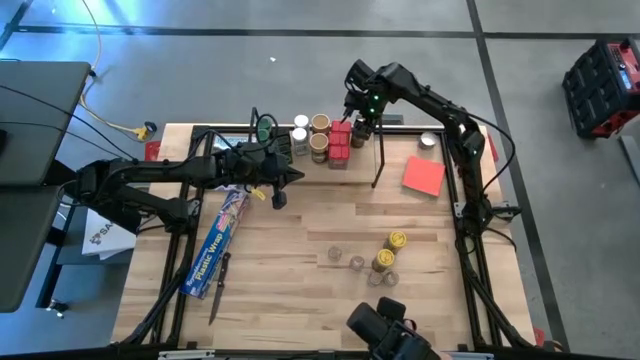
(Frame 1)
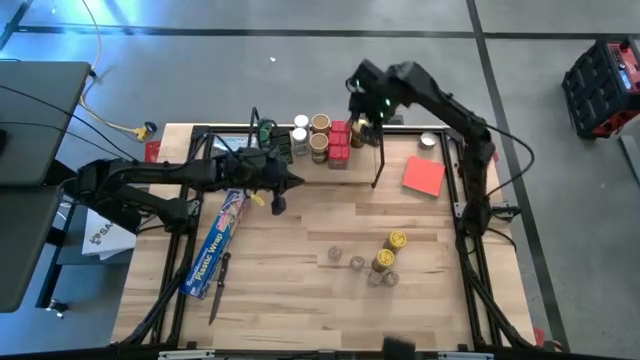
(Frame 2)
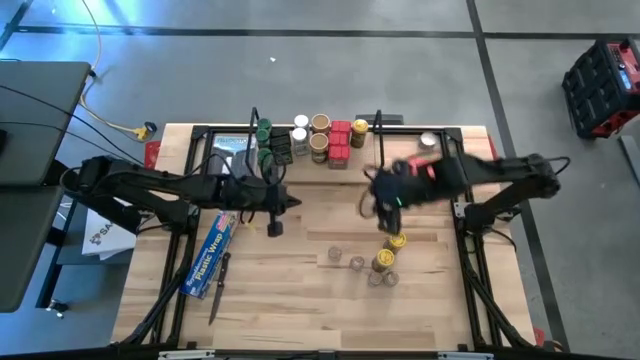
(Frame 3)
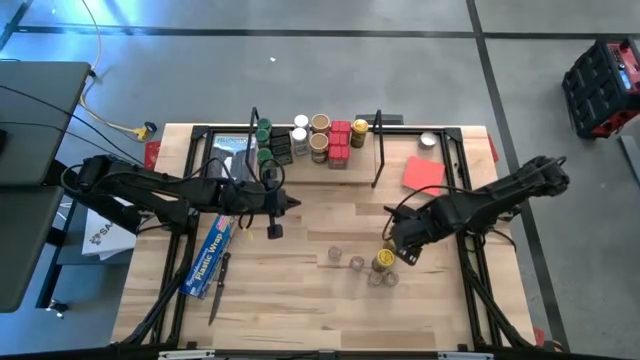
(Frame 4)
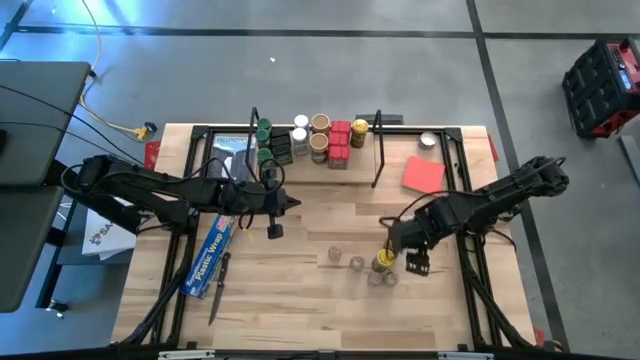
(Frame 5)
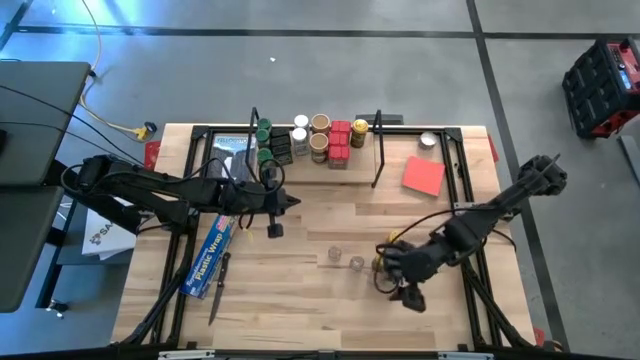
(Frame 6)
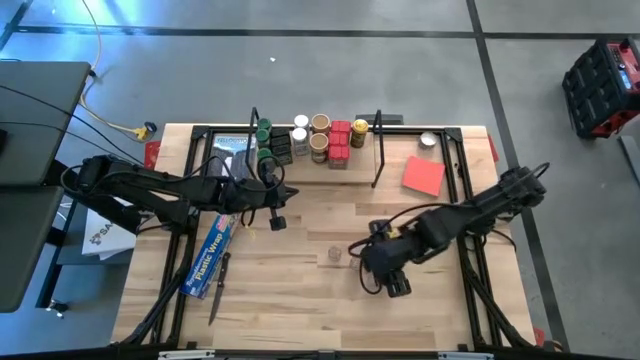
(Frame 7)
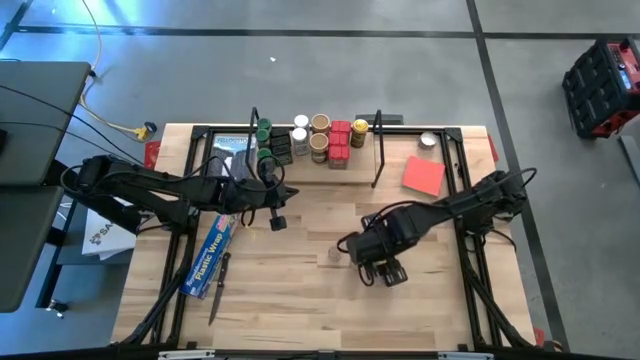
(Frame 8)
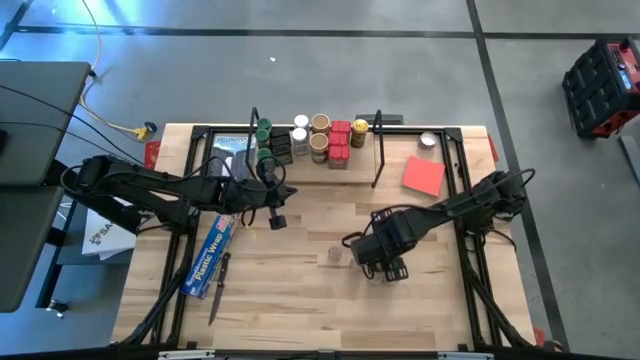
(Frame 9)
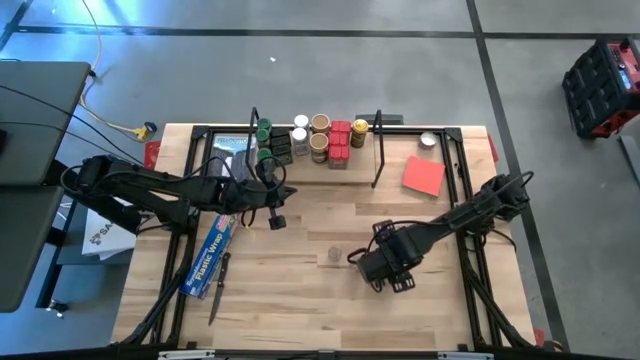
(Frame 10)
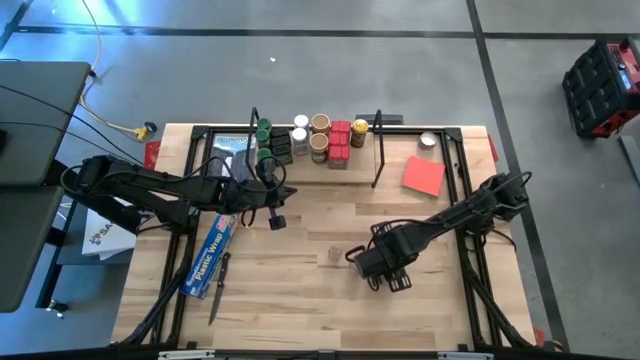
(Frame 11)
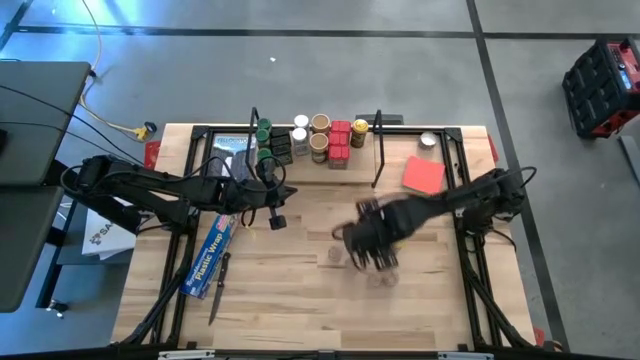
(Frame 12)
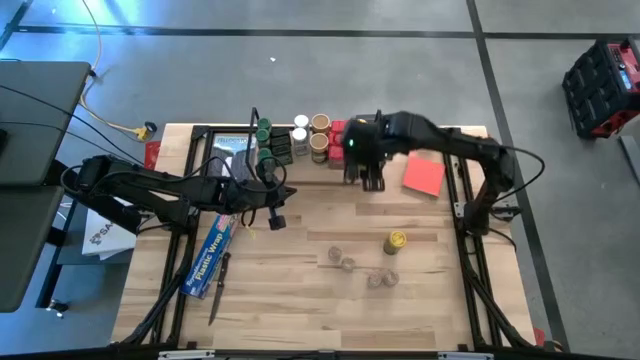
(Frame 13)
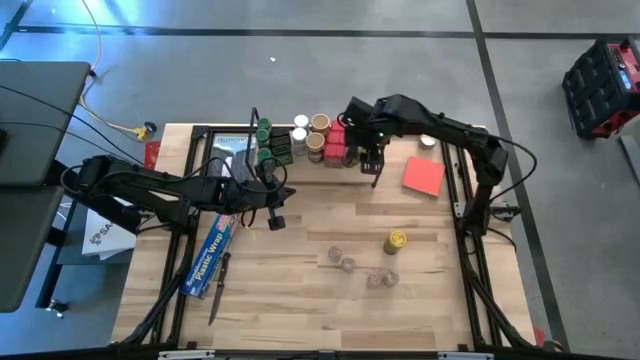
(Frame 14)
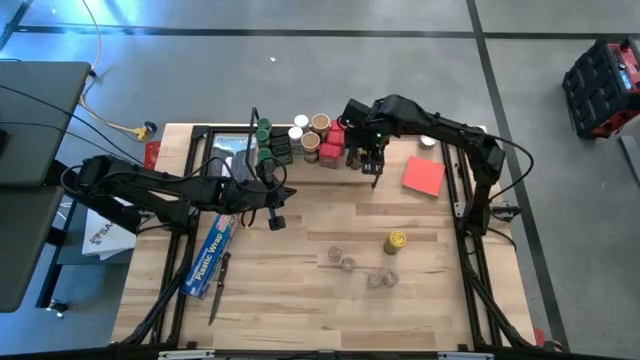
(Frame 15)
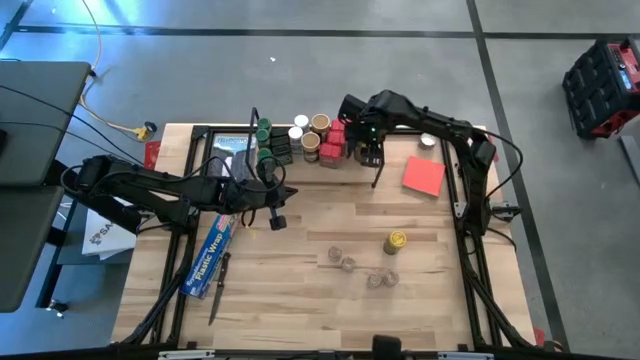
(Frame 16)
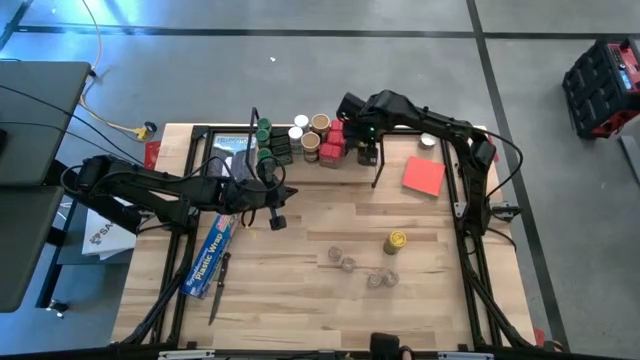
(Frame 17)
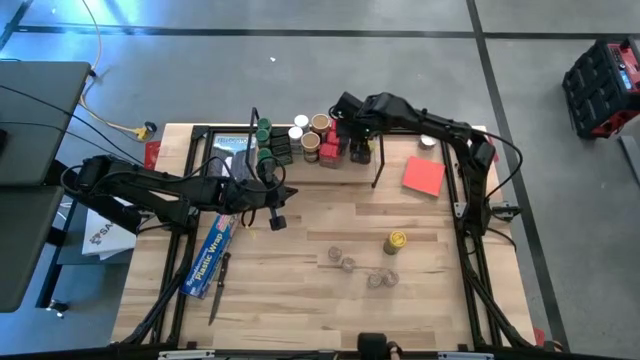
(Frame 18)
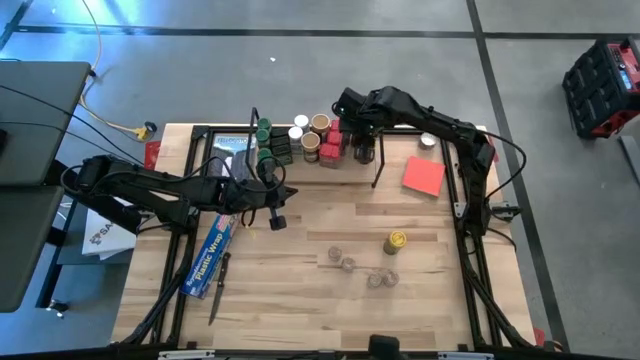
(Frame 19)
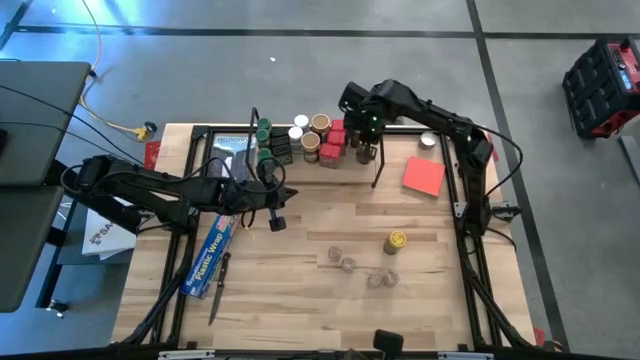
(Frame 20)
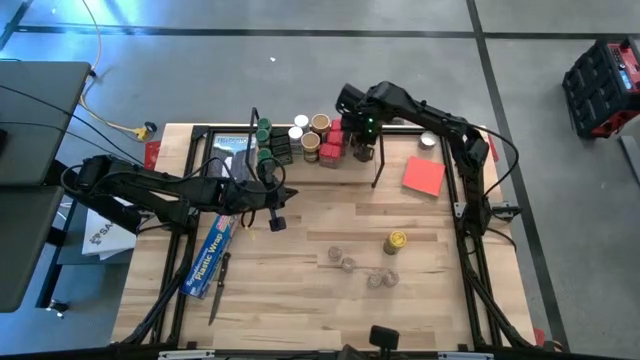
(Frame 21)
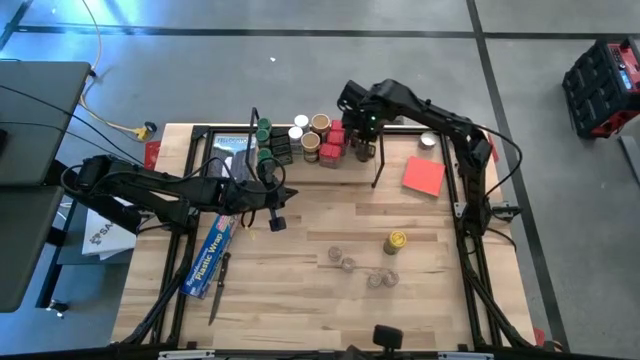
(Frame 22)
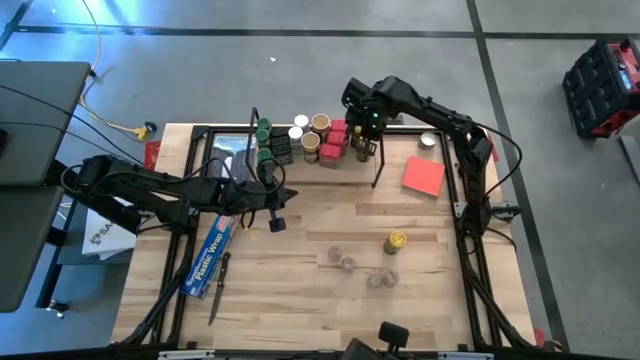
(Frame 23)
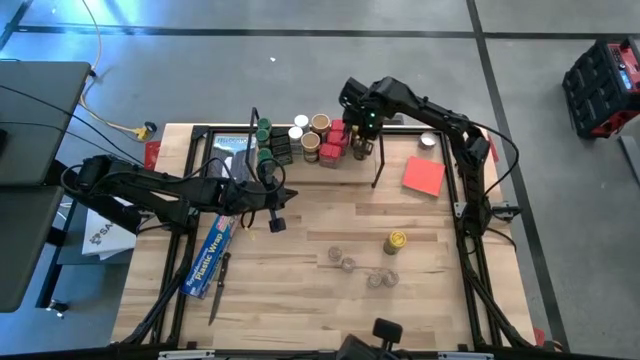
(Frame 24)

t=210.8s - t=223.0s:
Task: Shelf spices
Put the yellow seasoning bottle on the shelf and align it with the other yellow seasoning bottle

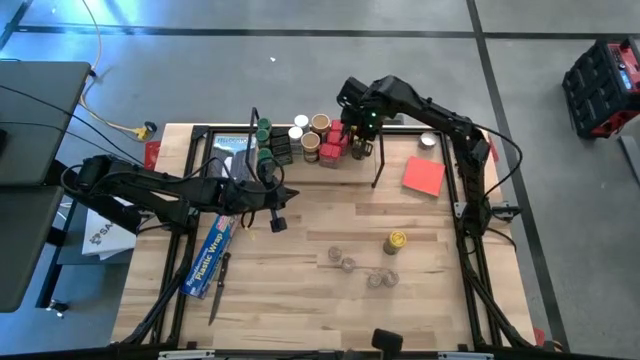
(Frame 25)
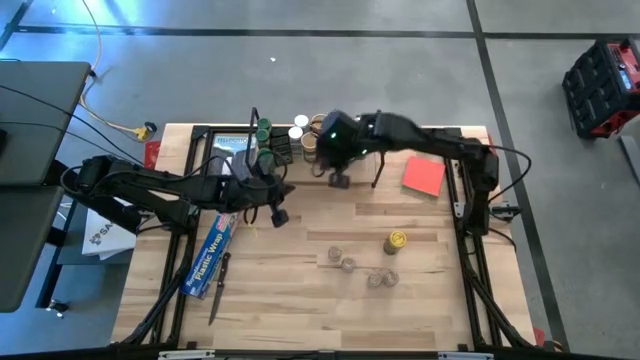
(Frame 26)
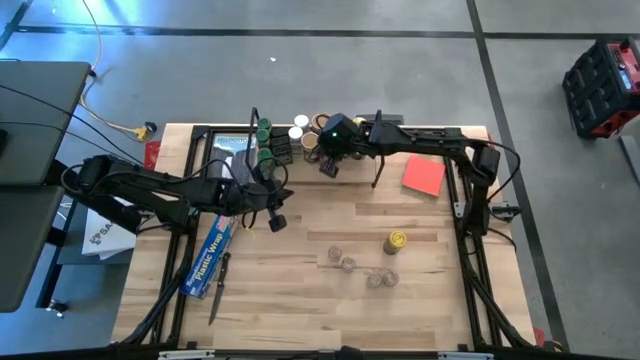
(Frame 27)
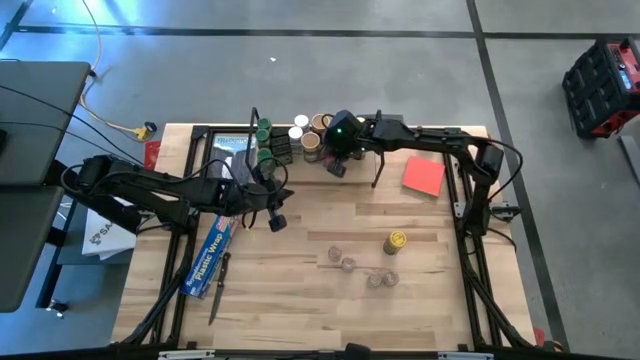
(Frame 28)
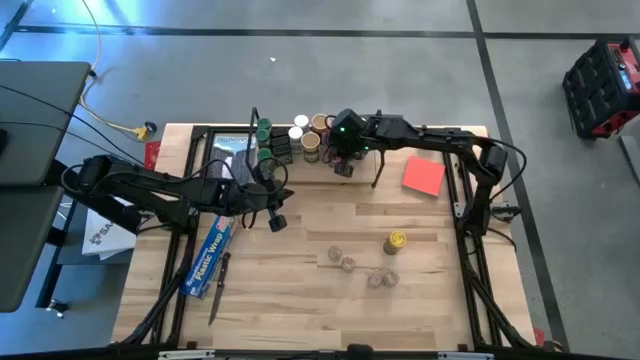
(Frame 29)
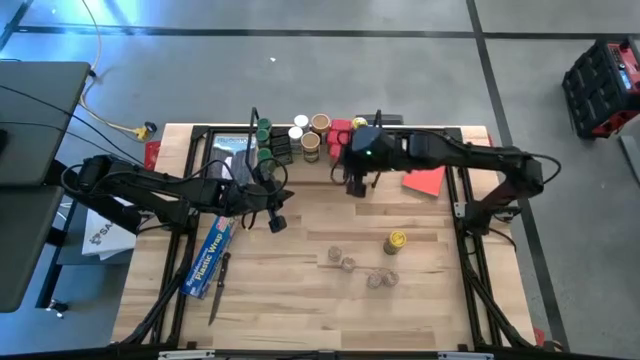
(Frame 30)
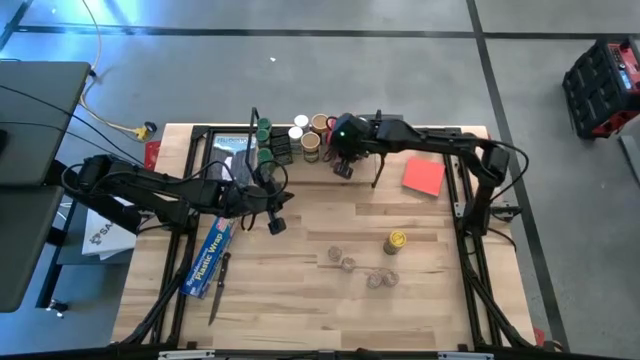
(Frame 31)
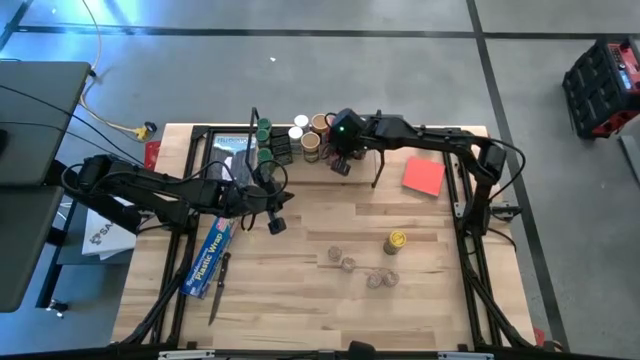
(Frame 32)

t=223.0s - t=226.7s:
Adjust the red seasoning cans on the shelf

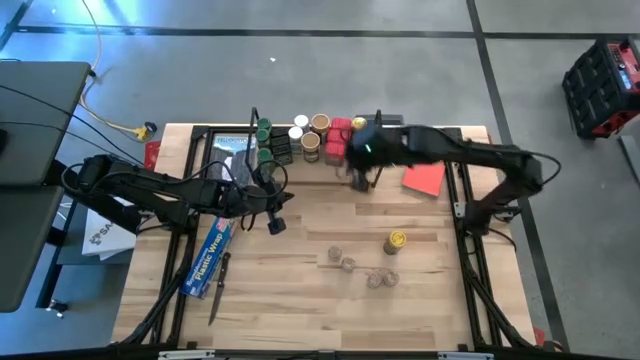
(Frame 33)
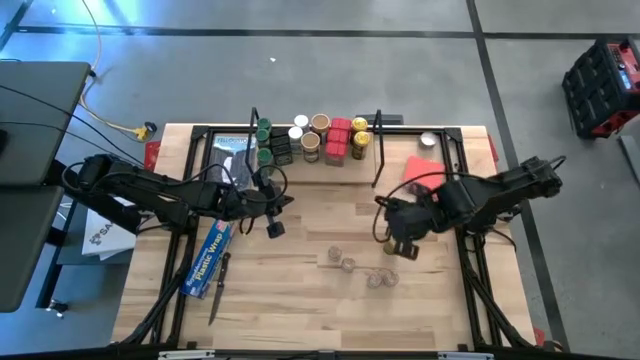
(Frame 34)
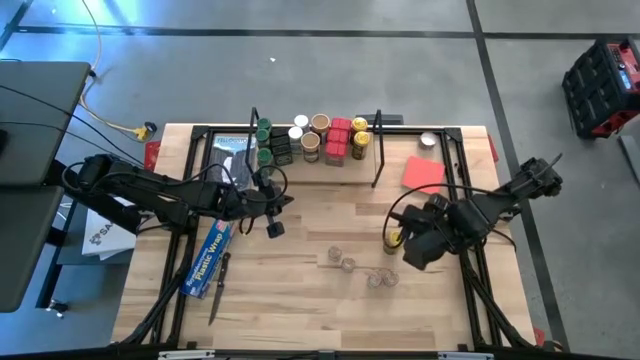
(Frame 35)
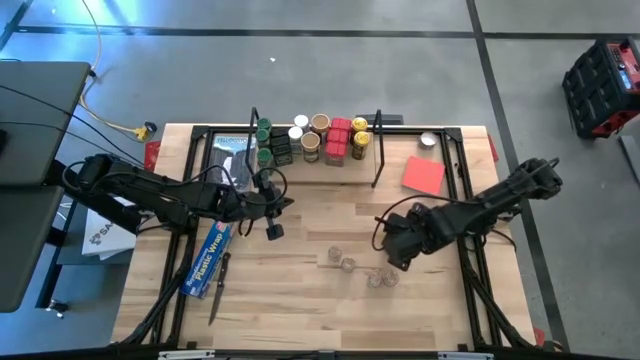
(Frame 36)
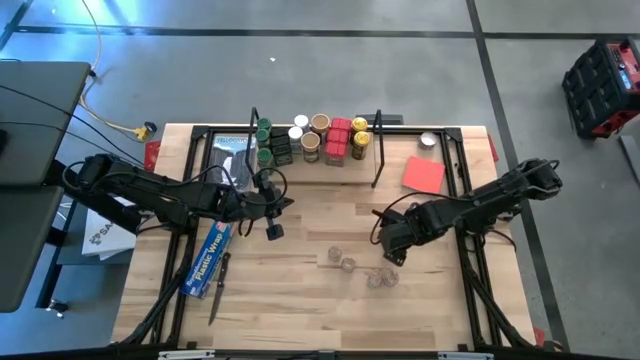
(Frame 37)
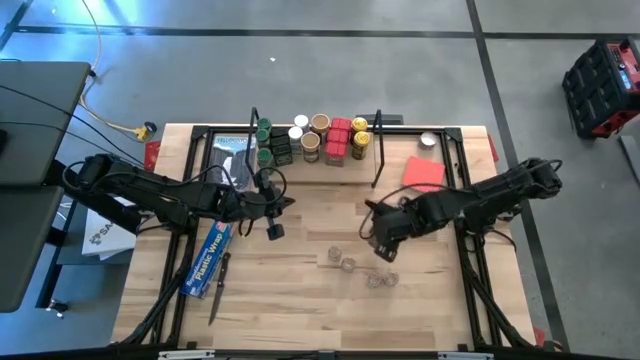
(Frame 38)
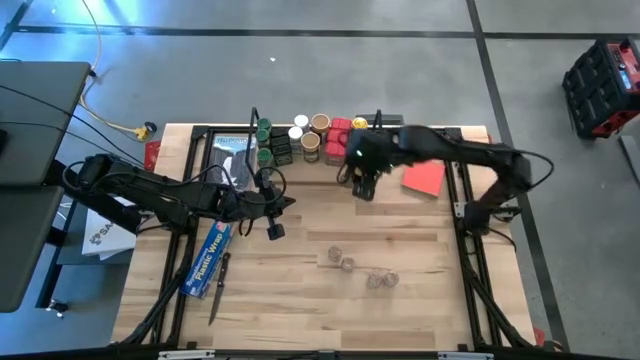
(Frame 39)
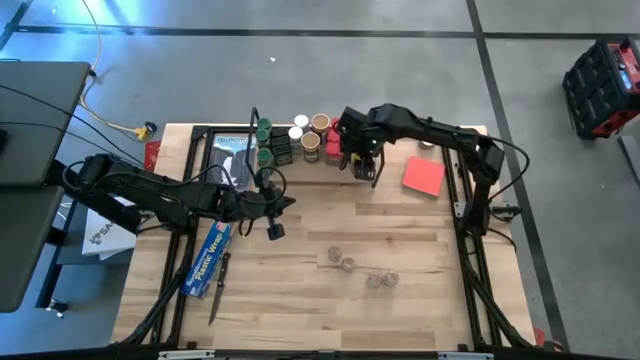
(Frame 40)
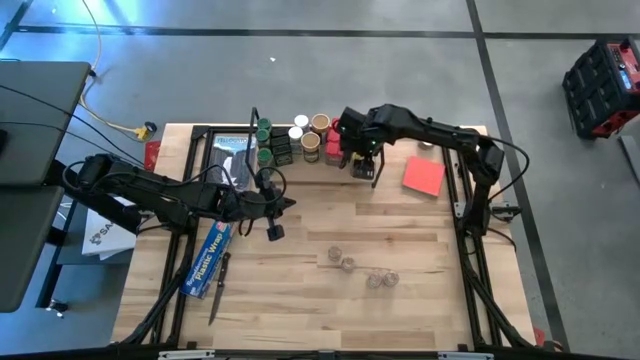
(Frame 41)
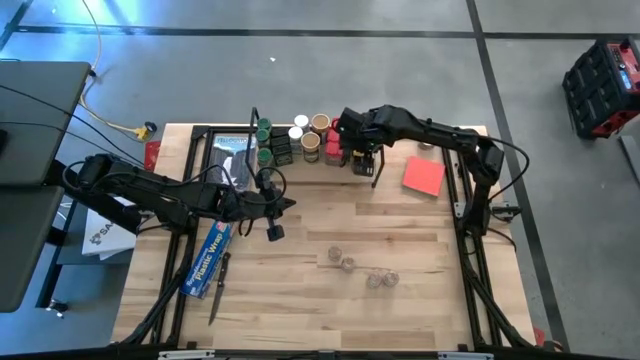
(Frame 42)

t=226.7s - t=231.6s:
Put the yellow seasoning bottle on the shelf and align it with the other yellow seasoning bottles

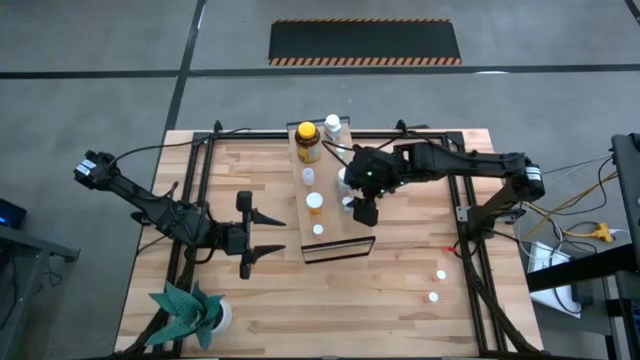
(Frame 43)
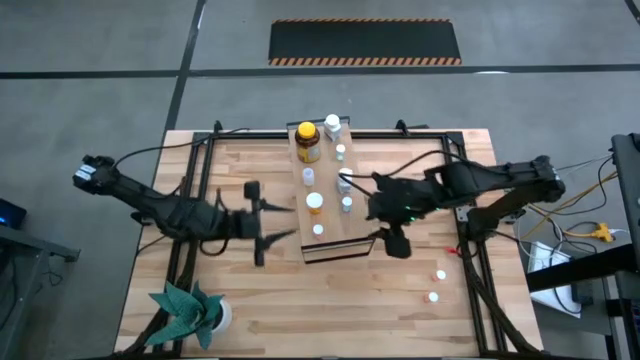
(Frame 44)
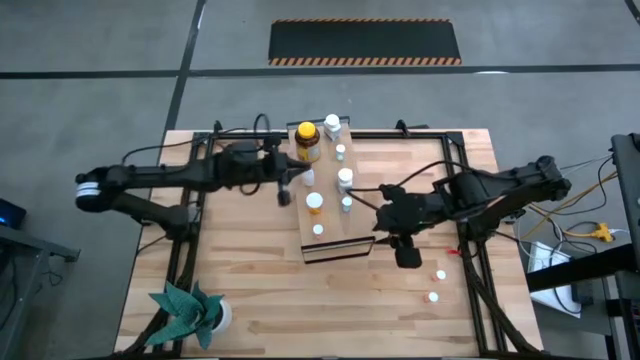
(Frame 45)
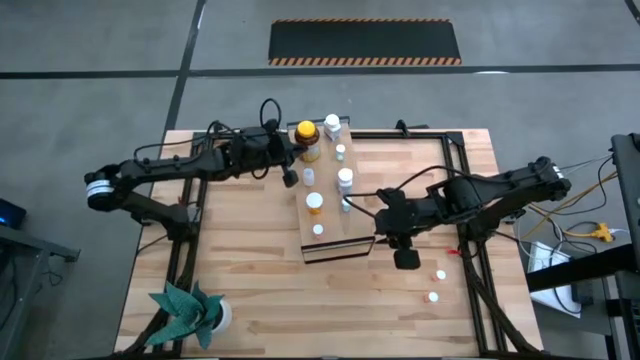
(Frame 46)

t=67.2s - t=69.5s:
Task: Pick and place medicine bottles onto shelf by color
Adjust the yellow pill bottle
